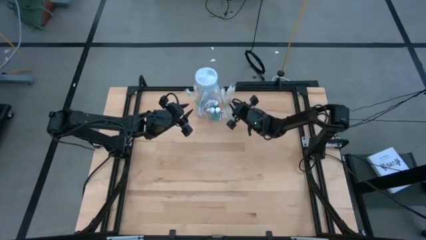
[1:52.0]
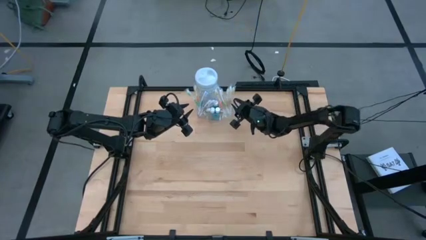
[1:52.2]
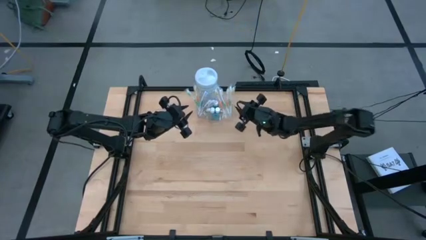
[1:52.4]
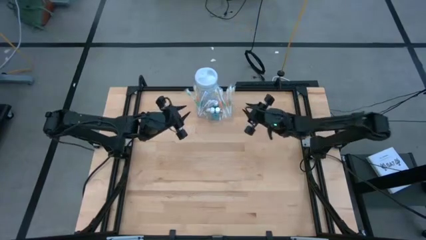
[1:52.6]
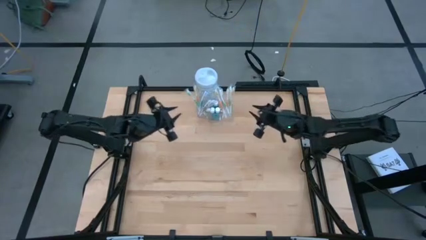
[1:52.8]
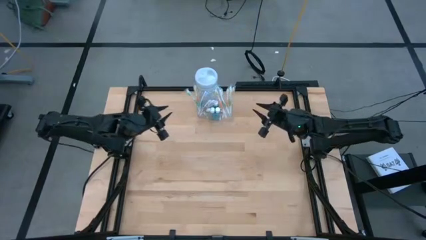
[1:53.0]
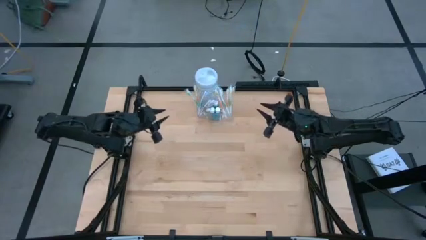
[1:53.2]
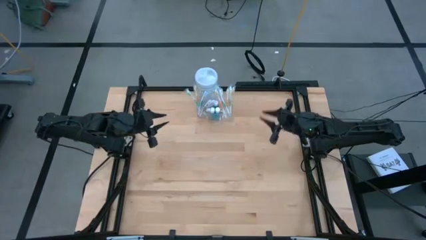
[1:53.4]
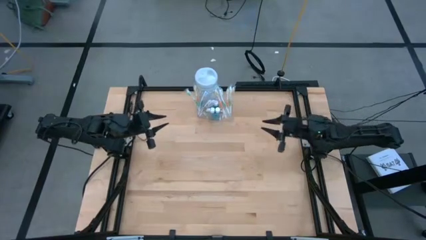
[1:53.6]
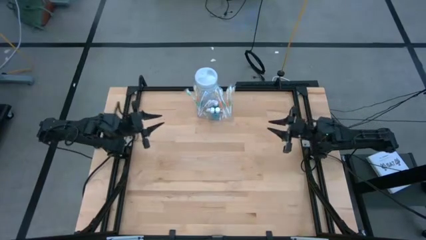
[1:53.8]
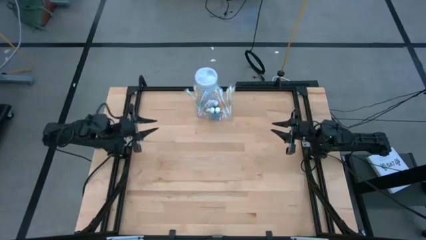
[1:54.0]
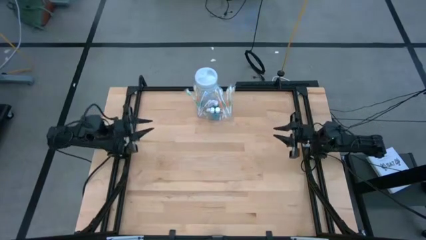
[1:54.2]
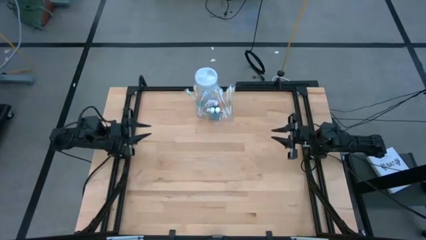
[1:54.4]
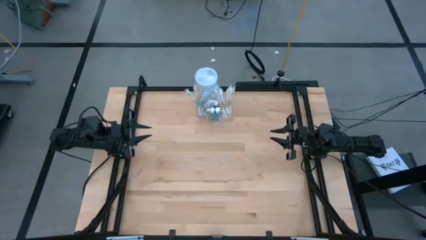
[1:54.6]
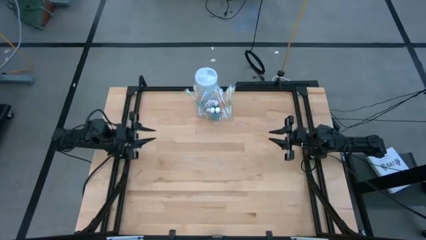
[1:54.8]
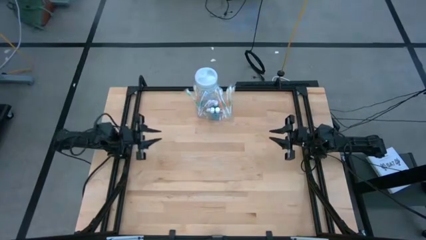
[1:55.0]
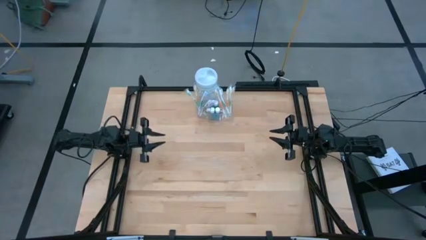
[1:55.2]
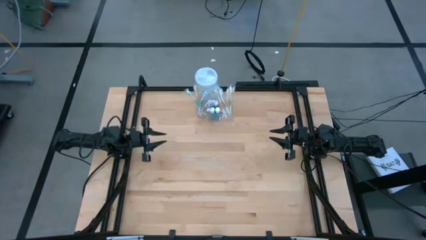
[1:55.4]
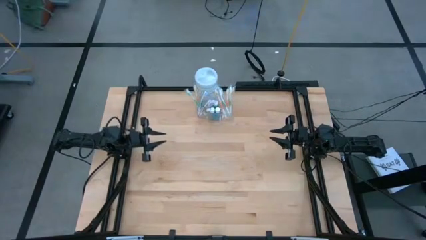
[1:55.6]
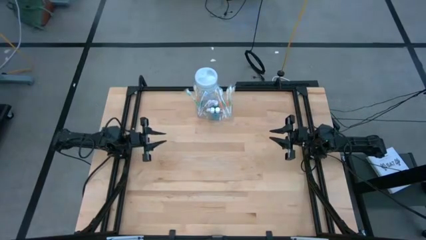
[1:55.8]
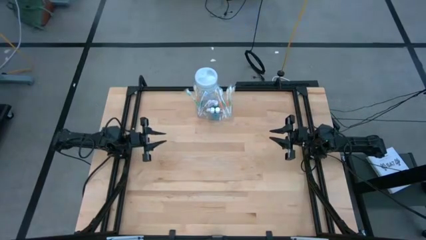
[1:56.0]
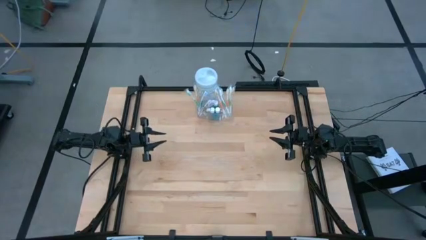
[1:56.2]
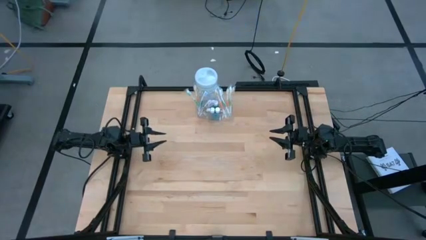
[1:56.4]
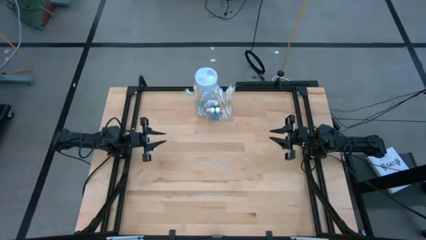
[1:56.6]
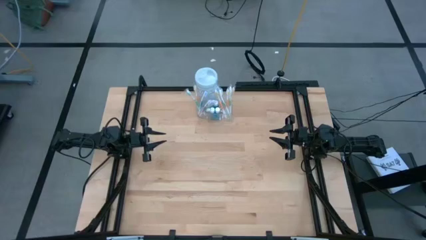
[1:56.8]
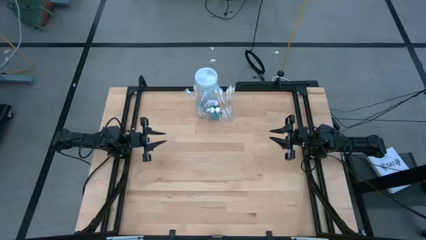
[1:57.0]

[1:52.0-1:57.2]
Task: Pick & Place toothbrushing station
Return to Home Position

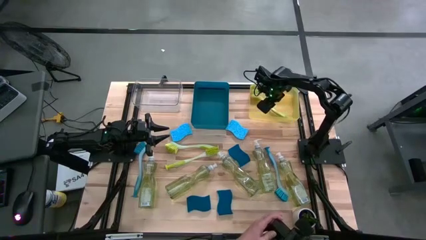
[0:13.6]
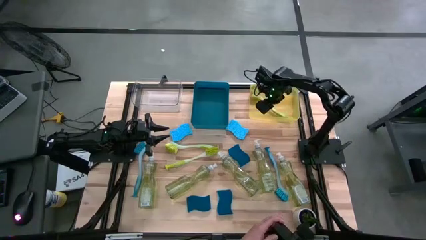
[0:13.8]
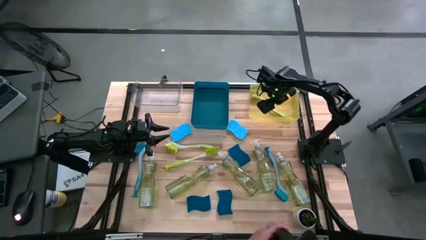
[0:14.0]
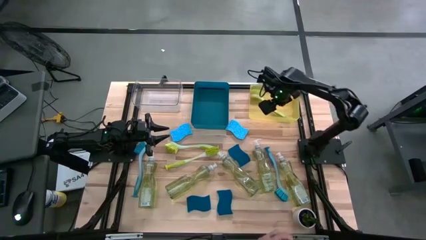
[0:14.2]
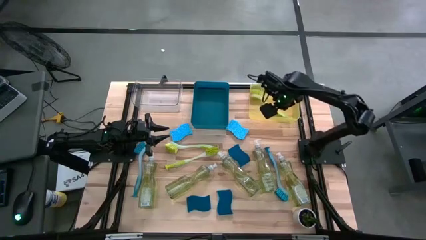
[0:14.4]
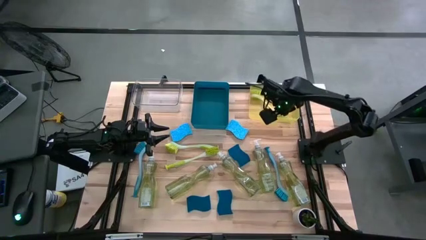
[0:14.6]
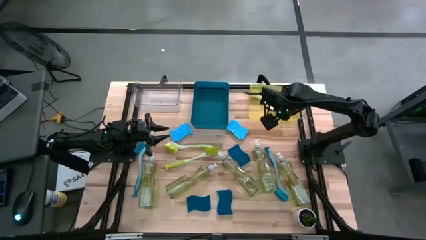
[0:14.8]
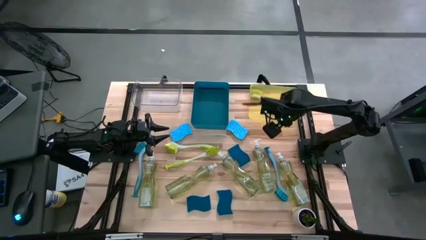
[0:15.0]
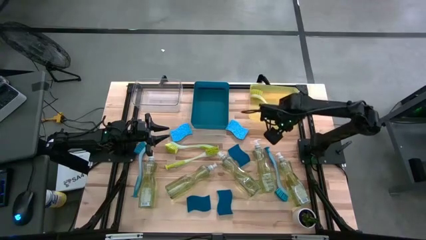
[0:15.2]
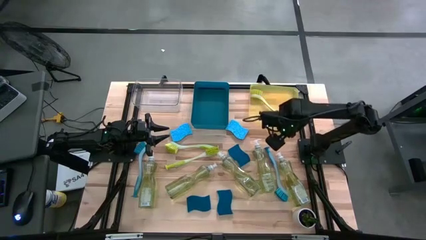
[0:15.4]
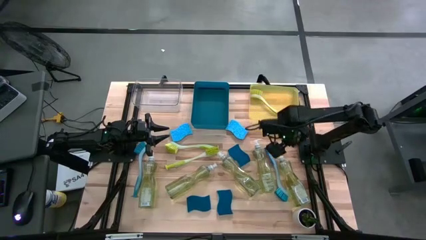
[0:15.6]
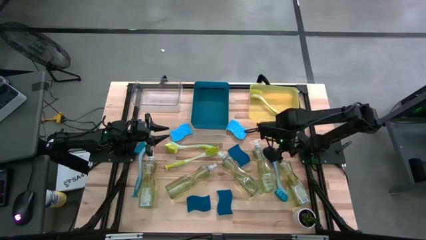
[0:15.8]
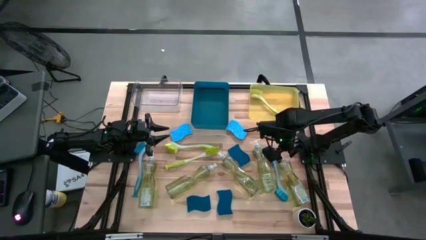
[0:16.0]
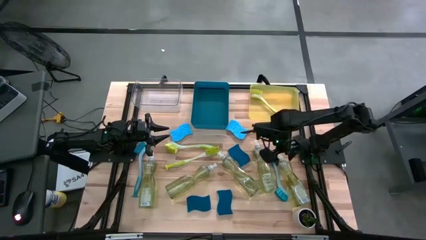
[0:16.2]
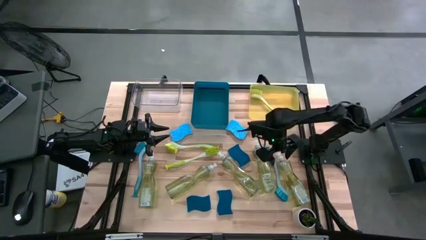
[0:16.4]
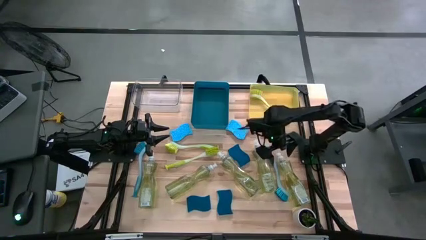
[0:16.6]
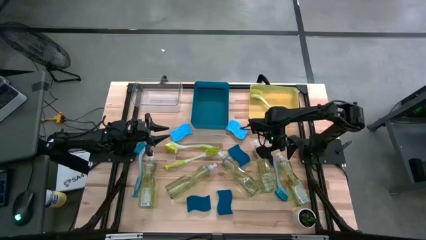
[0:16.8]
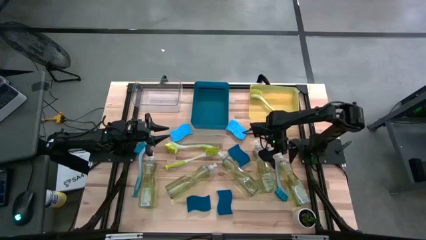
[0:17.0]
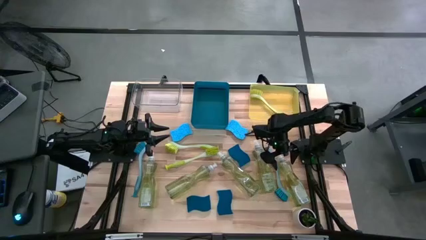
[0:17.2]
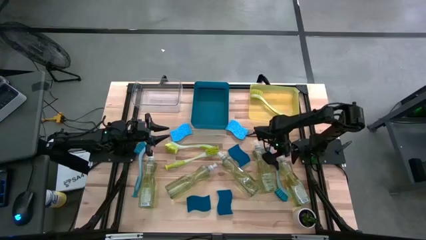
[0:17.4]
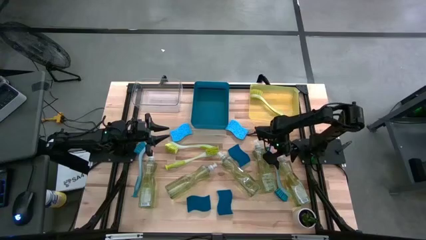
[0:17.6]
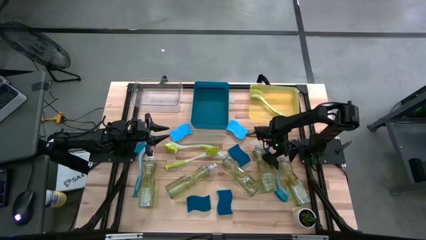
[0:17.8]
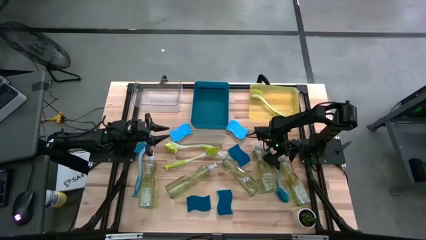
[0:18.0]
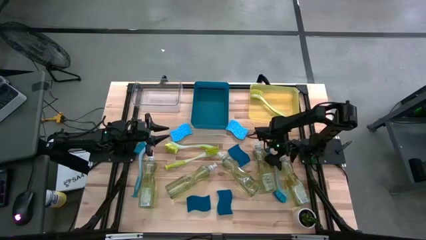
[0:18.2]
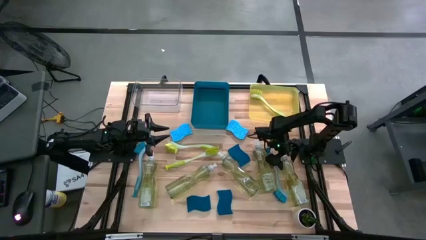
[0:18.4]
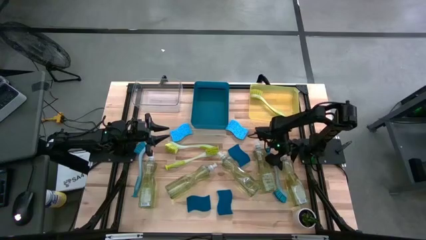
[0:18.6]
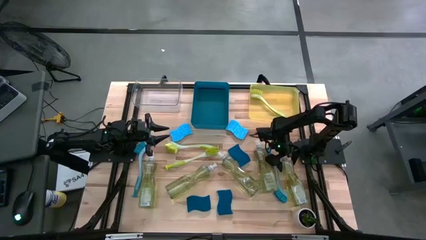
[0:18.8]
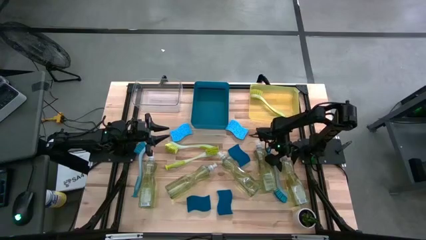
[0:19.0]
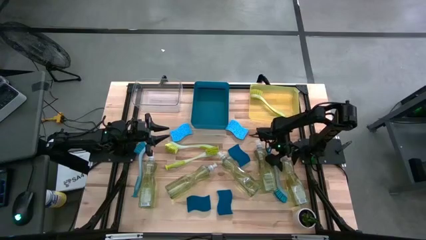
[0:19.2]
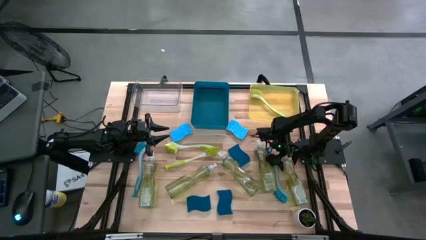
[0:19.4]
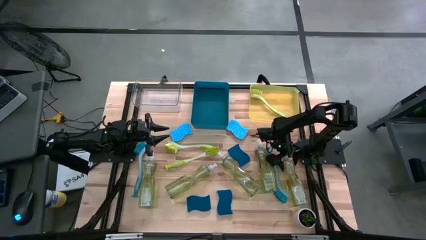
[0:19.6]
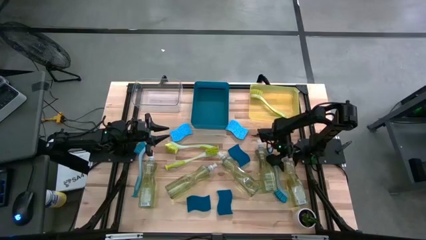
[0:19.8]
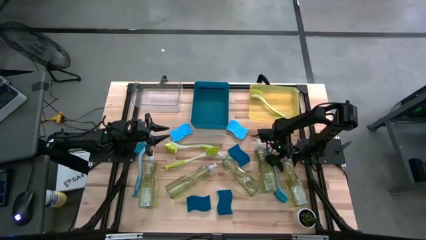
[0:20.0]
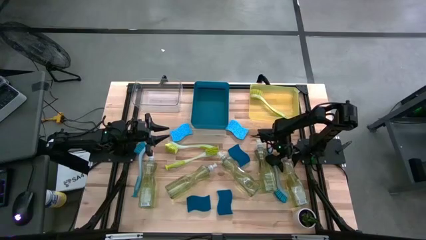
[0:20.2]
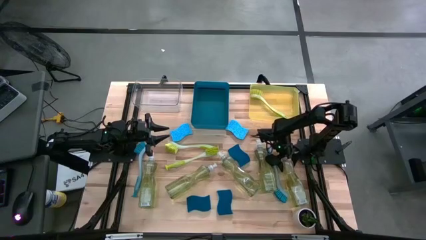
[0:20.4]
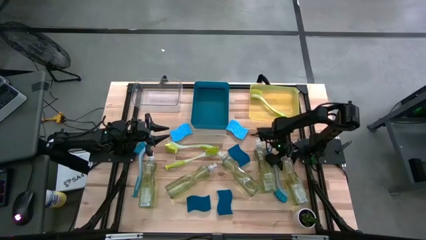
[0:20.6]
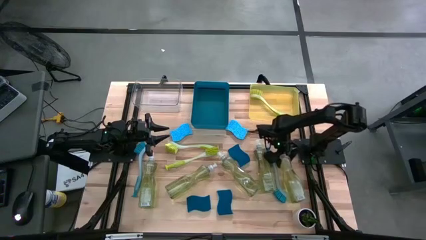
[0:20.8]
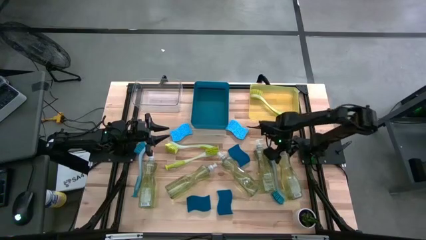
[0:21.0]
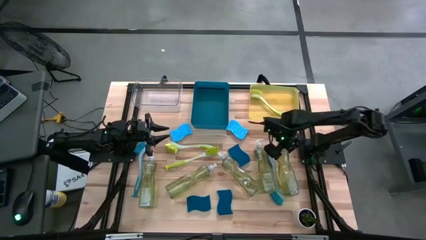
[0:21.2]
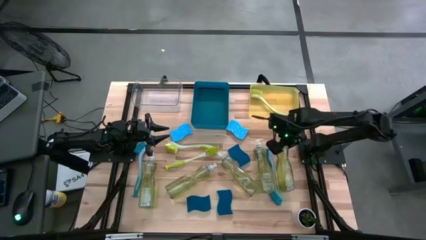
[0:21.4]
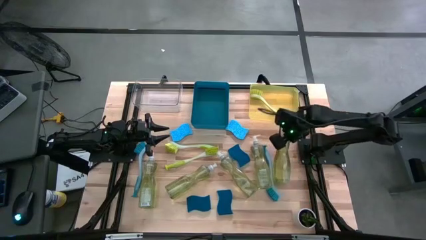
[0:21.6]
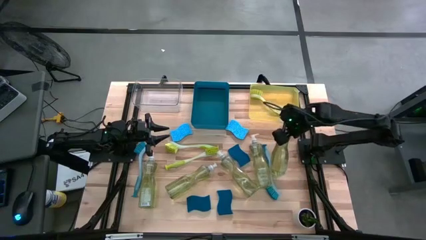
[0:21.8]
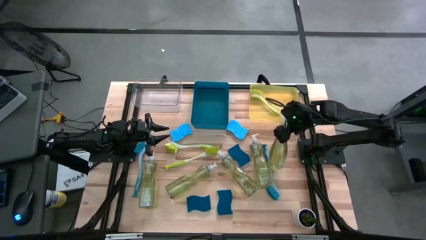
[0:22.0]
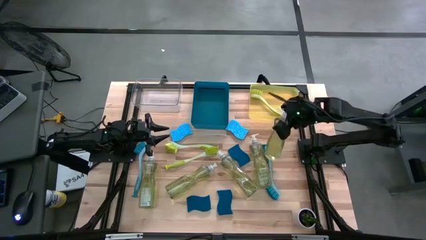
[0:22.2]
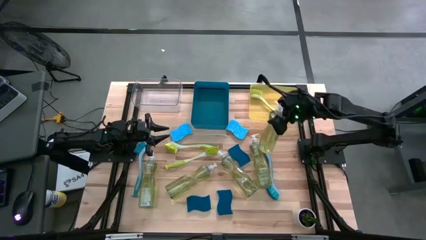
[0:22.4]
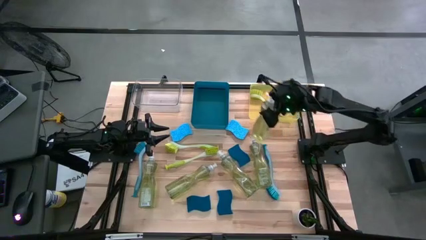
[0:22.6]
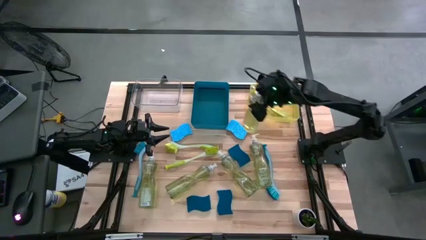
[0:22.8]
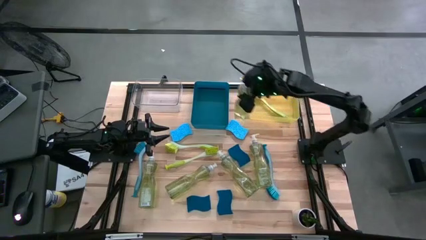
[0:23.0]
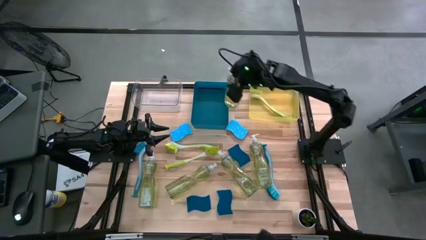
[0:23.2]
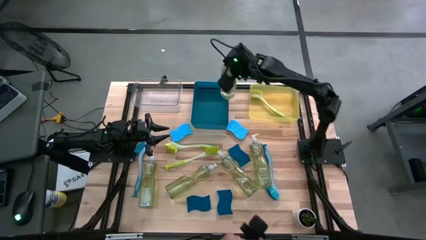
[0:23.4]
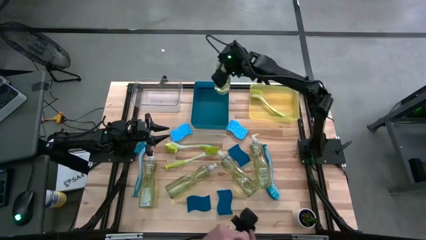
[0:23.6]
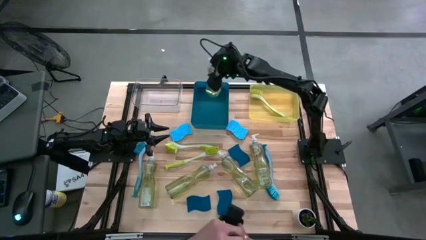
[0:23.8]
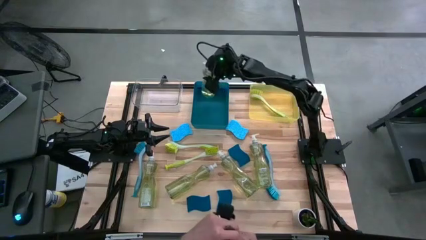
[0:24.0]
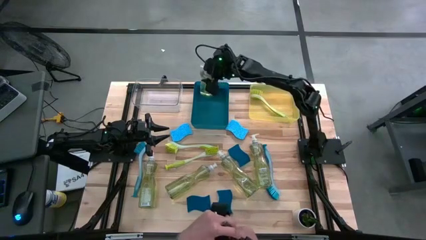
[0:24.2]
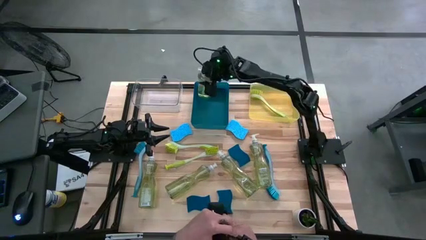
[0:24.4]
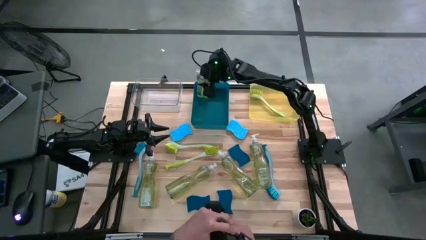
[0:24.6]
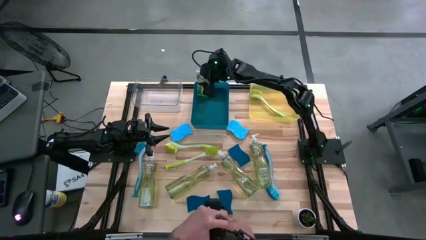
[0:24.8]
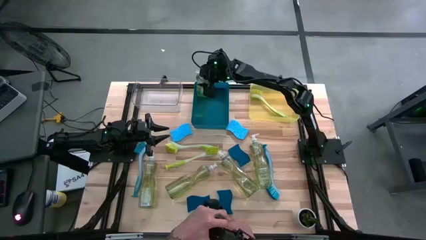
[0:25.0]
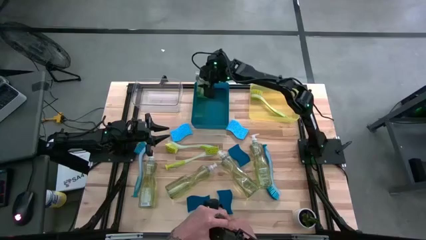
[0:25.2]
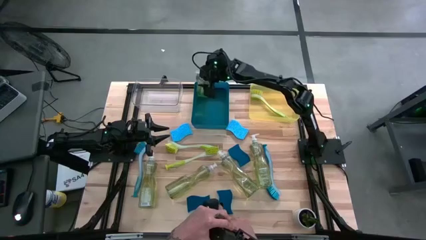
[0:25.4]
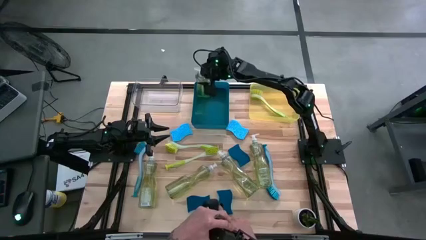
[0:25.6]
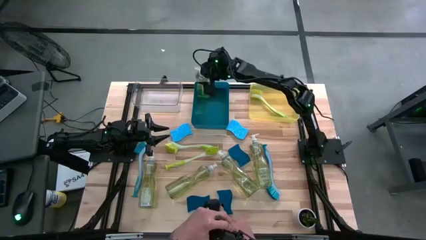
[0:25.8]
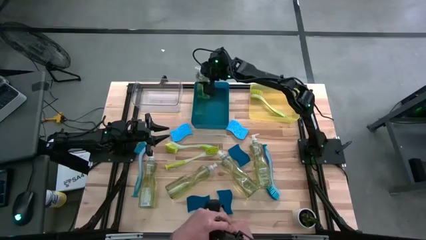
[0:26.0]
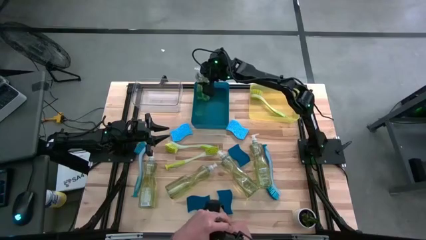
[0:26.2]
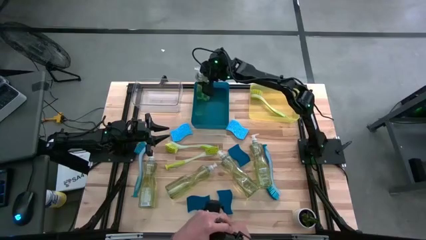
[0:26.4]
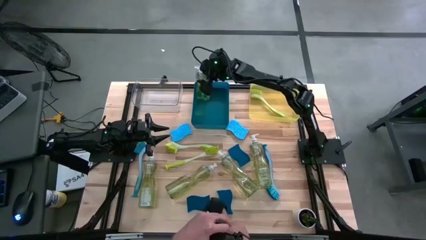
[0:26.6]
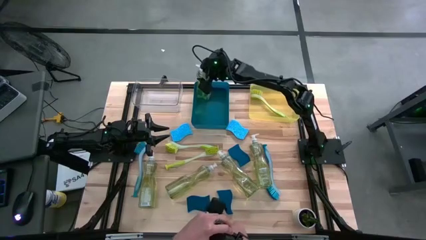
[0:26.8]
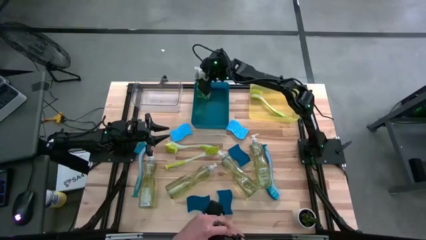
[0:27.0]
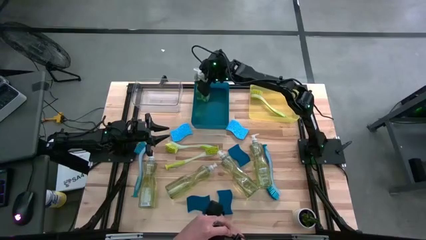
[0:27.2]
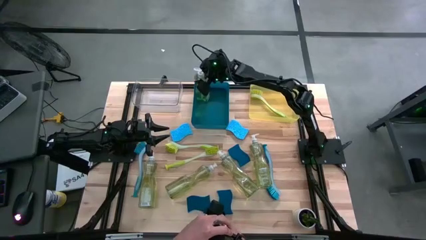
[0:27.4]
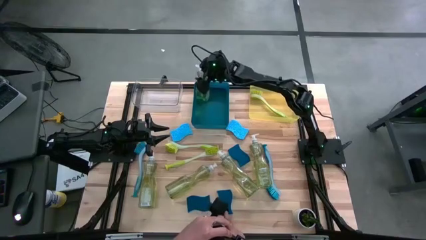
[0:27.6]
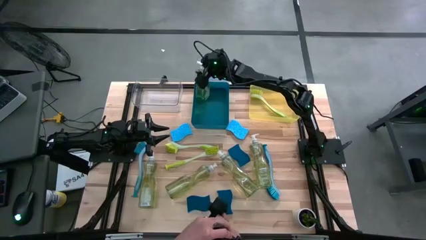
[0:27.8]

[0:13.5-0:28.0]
Task: Pick & Place Kitchen Sink Supplies
Put the yellow soap dispenser into the blue bin
